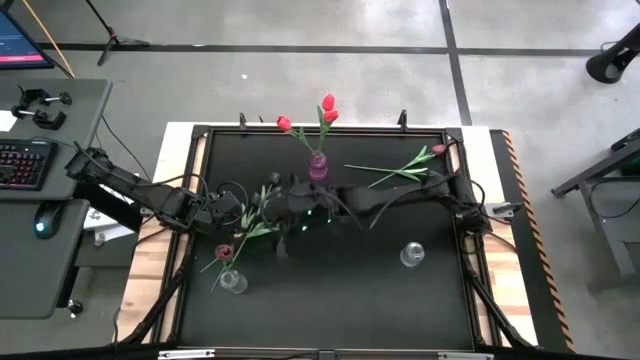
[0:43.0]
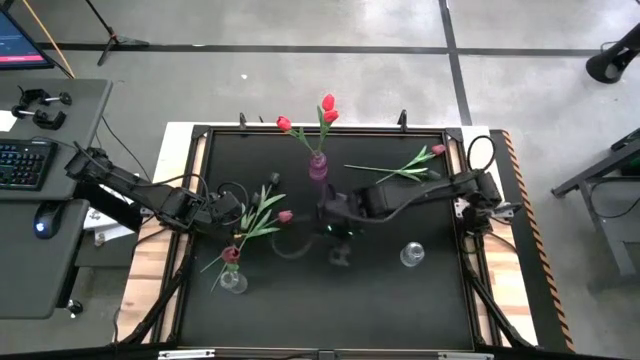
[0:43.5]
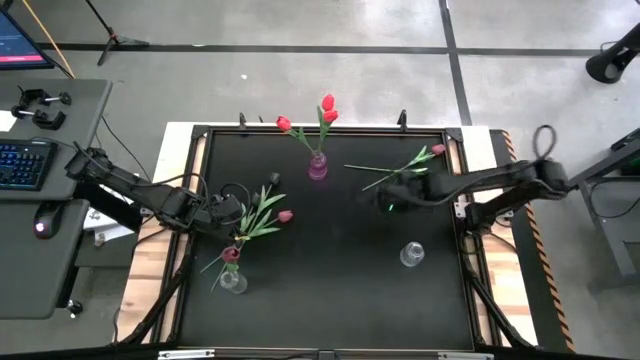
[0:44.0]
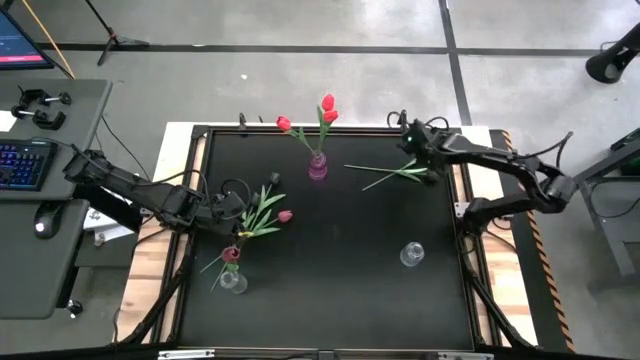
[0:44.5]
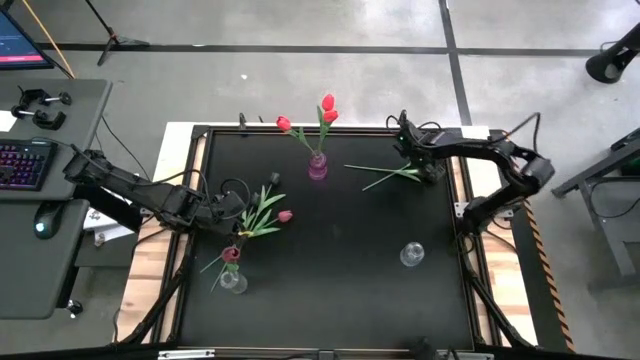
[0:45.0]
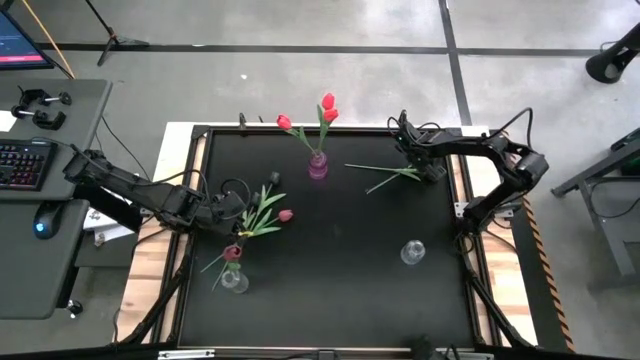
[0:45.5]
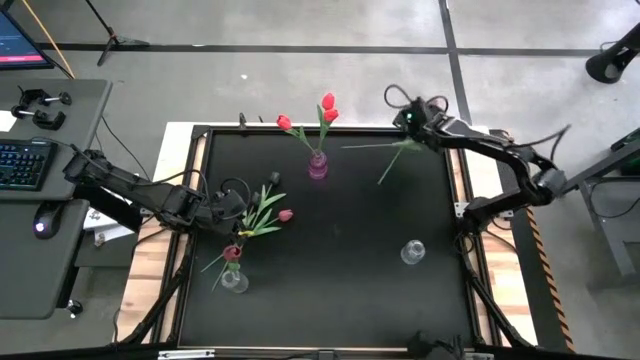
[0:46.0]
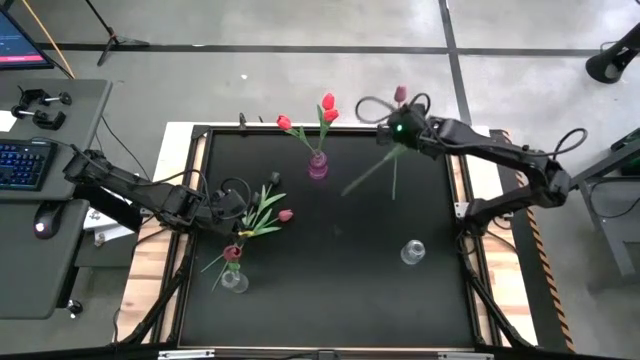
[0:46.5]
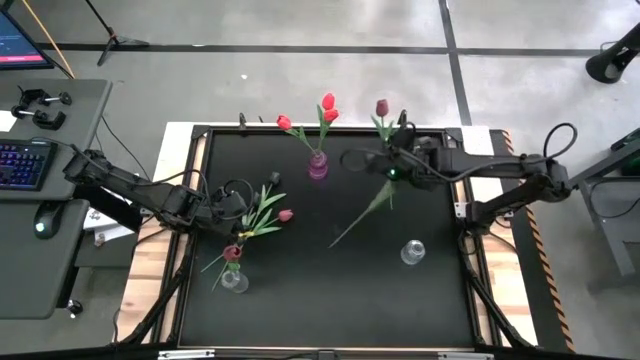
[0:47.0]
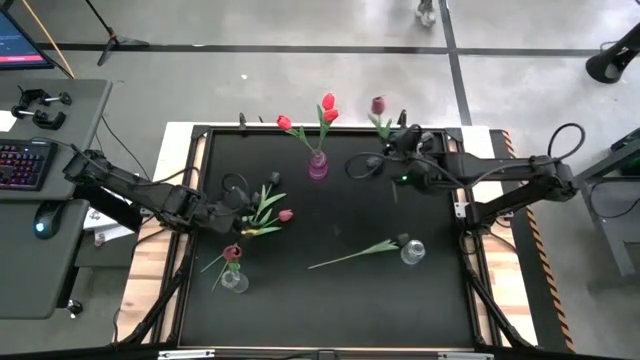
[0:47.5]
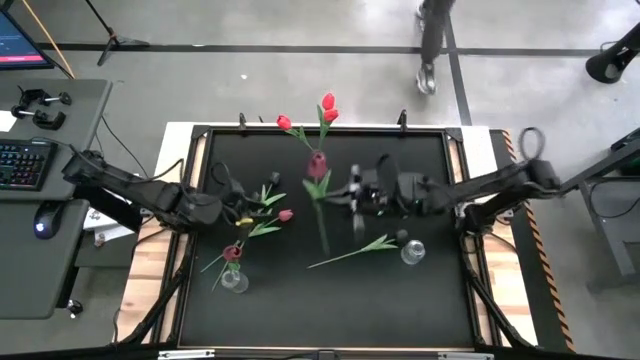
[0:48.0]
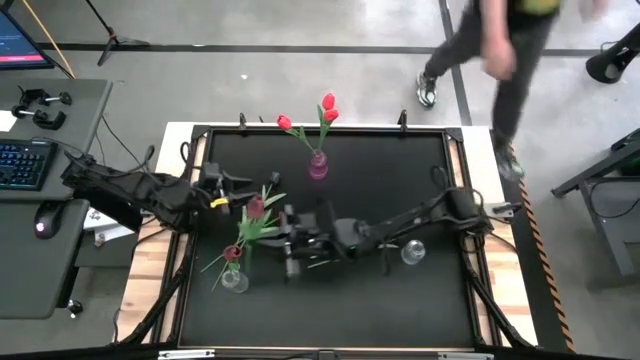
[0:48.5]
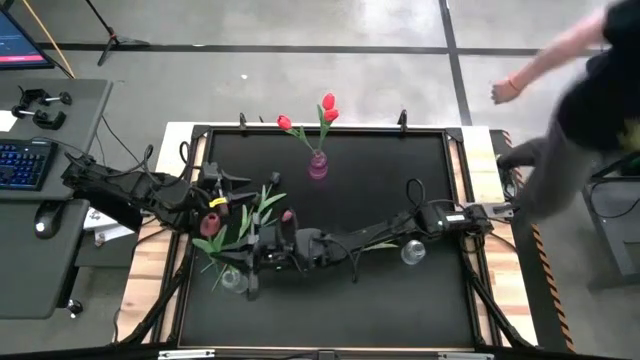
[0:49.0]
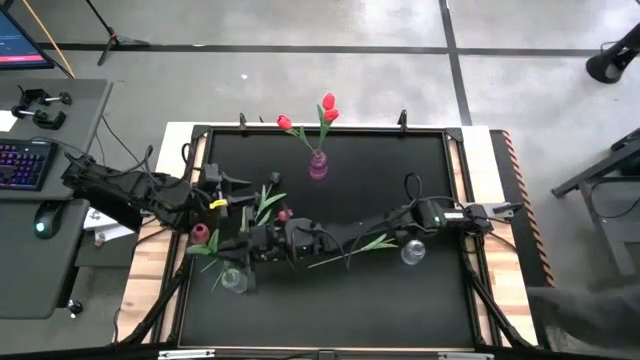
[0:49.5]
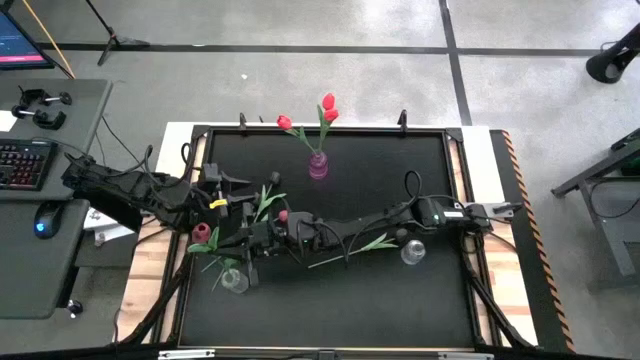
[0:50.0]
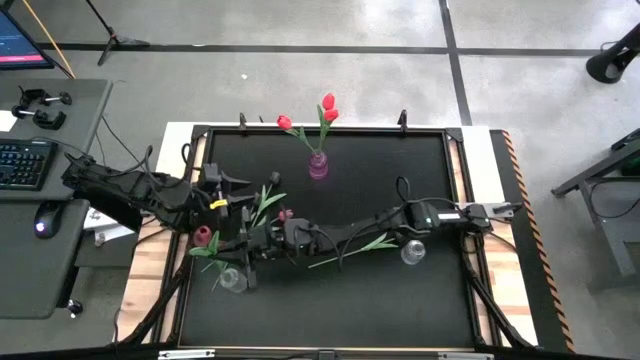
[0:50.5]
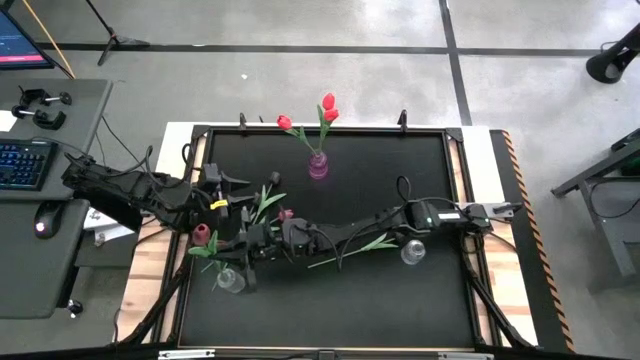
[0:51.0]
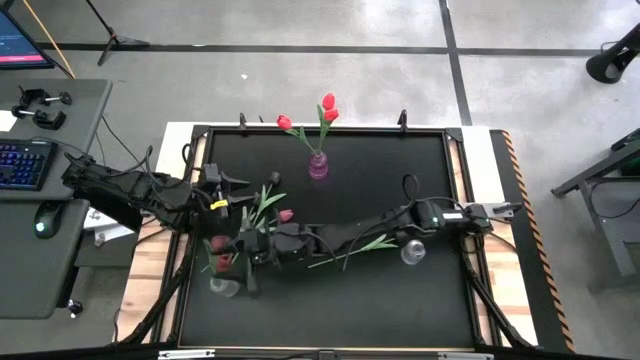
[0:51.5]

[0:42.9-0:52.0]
Task: Sort flowers into vase by color
Put the right red tulip into the left transparent vase

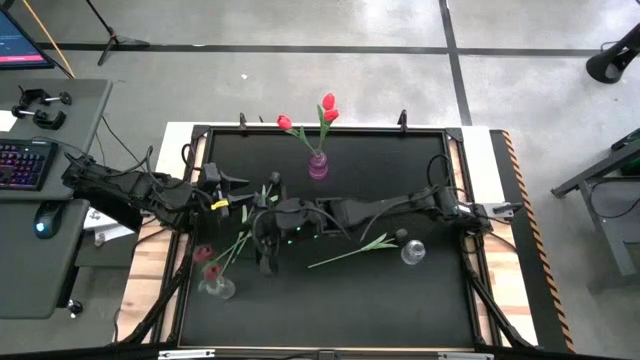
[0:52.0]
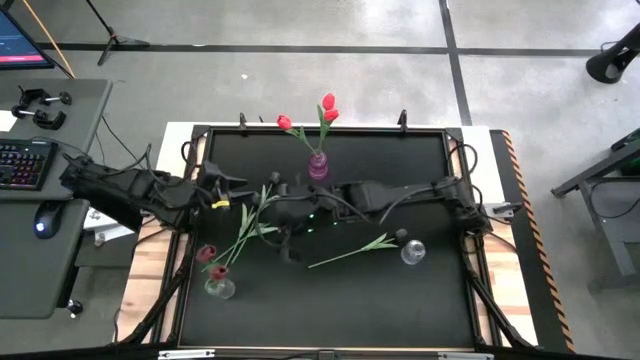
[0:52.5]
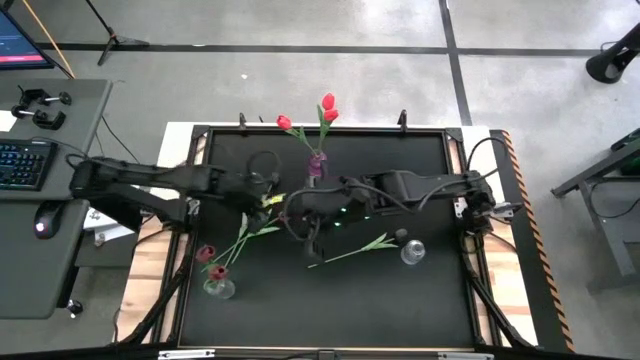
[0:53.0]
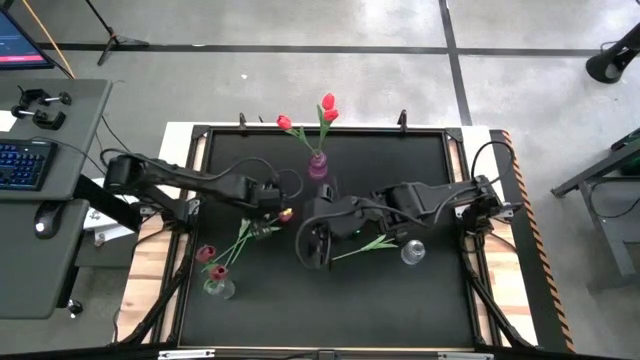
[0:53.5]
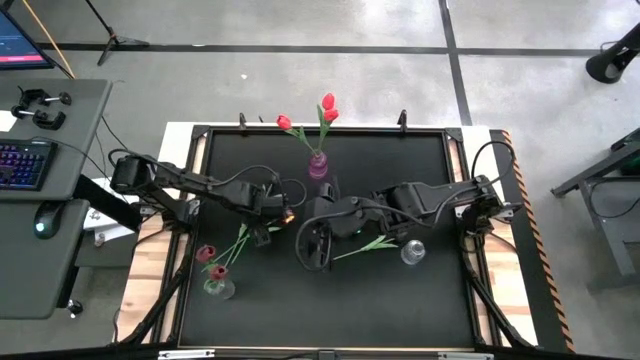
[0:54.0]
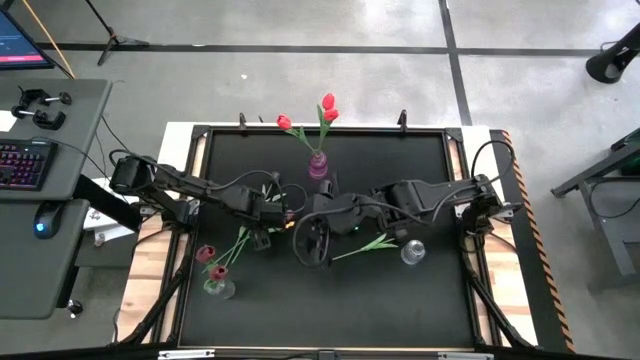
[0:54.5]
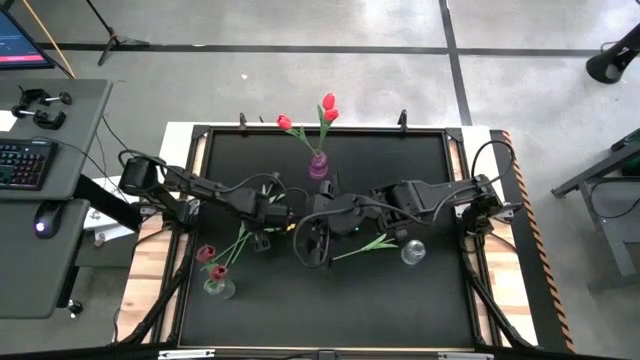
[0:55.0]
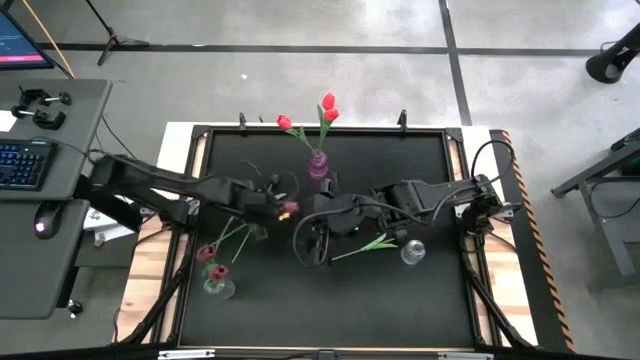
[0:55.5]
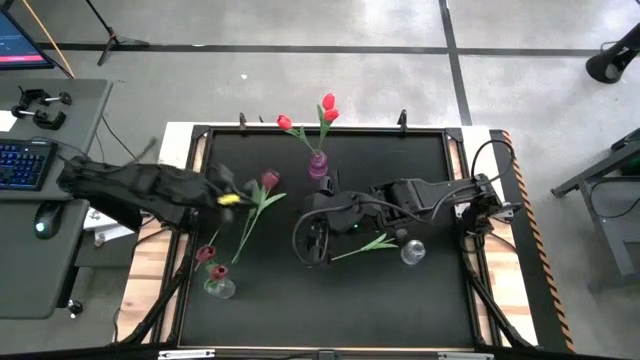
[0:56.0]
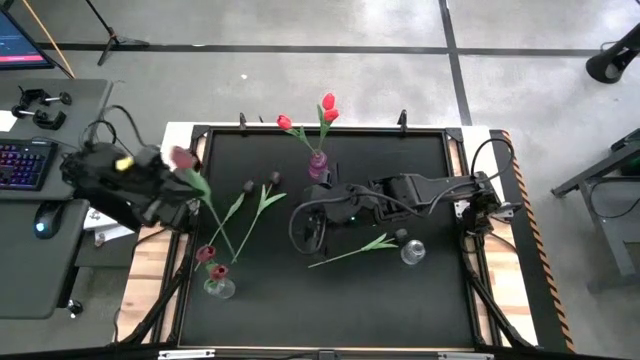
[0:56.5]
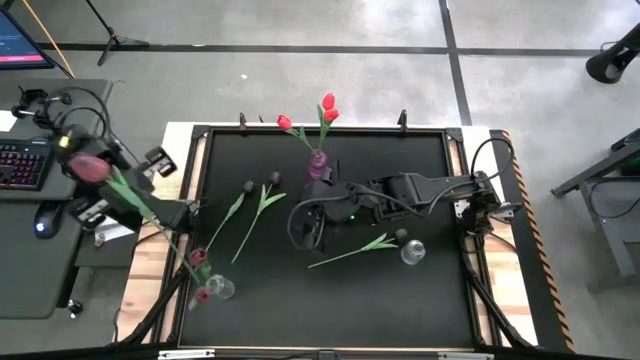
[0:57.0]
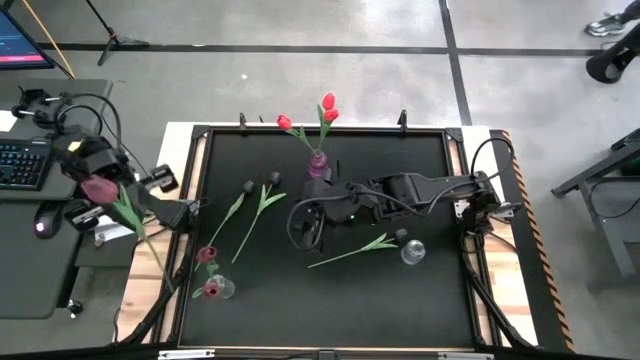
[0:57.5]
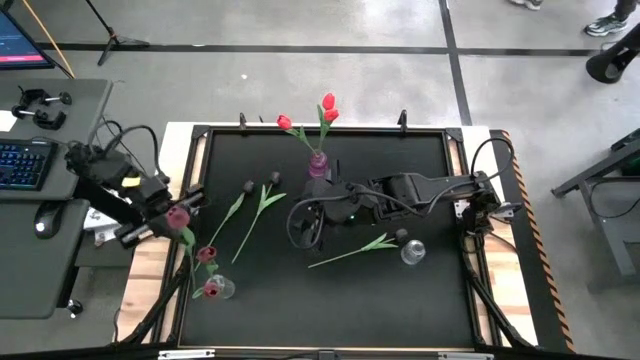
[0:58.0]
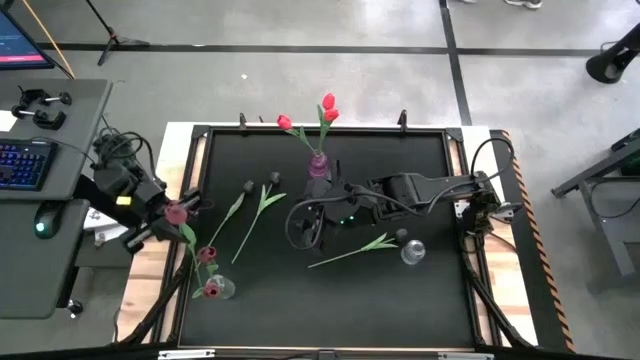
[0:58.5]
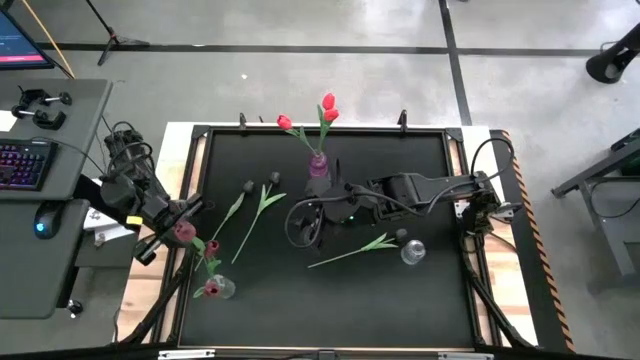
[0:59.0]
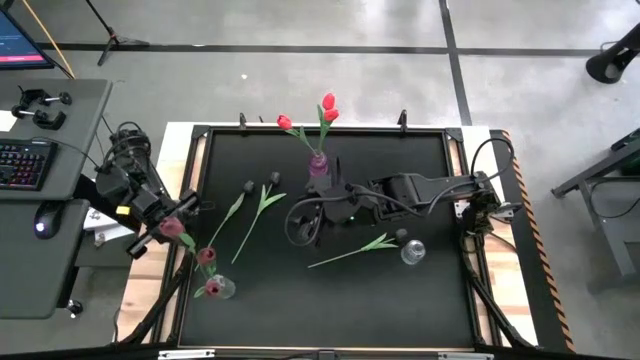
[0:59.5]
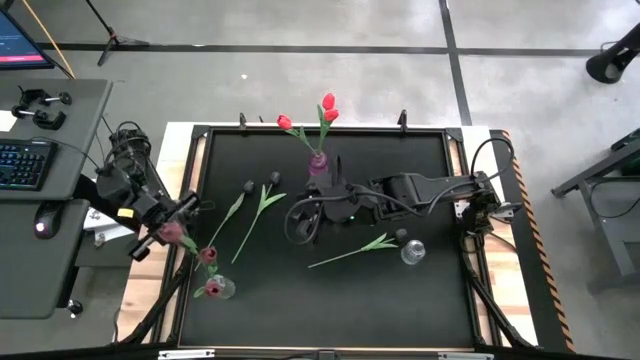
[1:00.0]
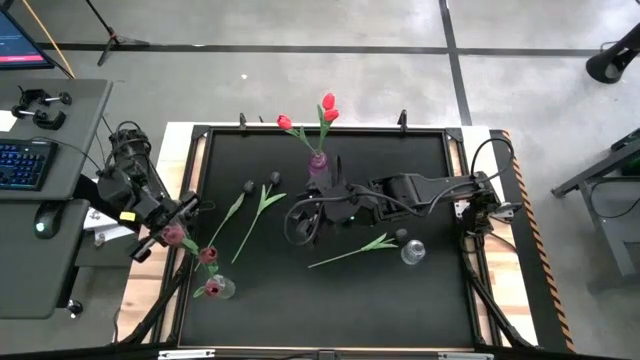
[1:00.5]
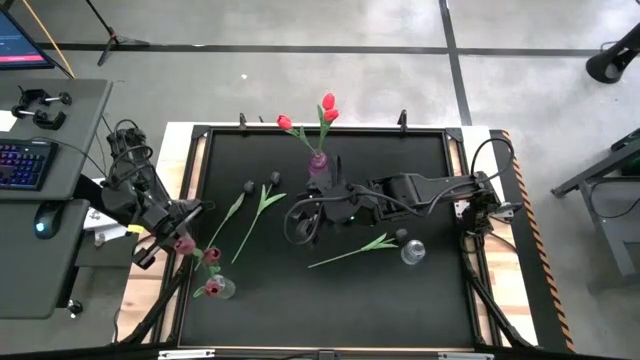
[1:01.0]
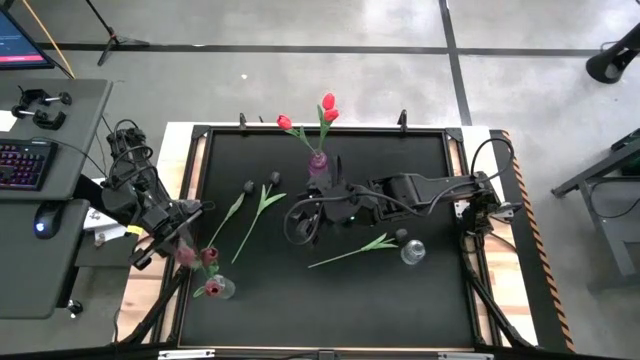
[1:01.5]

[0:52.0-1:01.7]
Put the red tulip into the left transparent vase

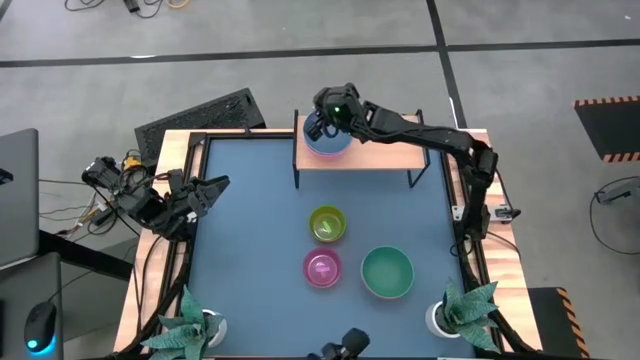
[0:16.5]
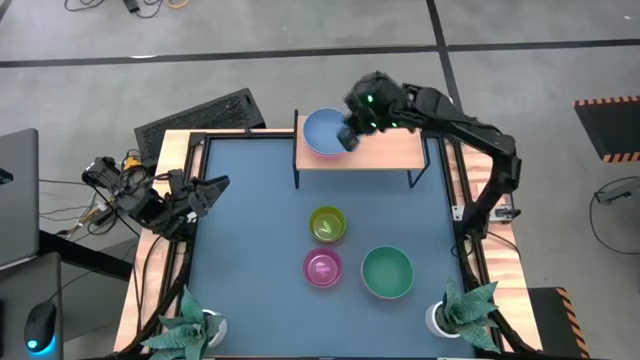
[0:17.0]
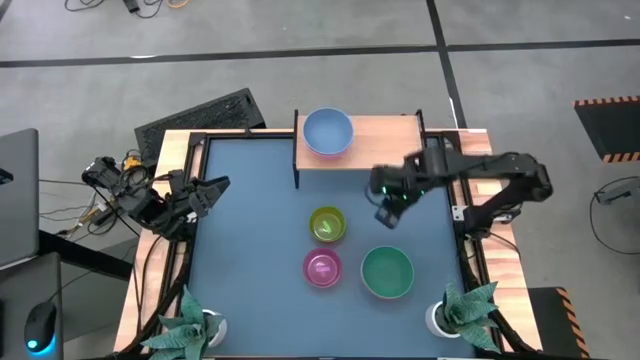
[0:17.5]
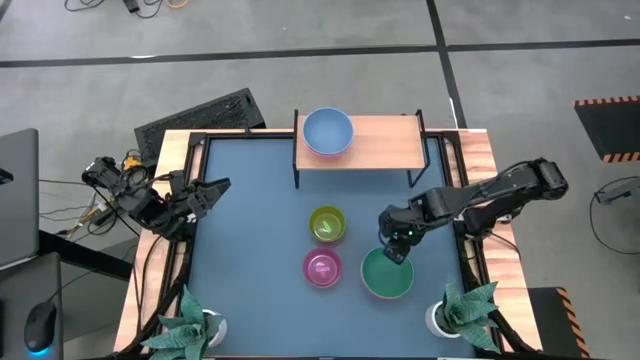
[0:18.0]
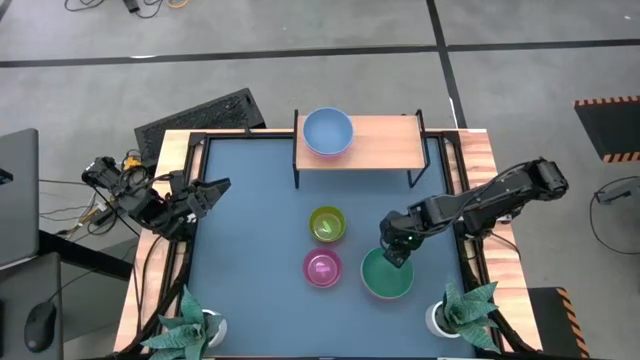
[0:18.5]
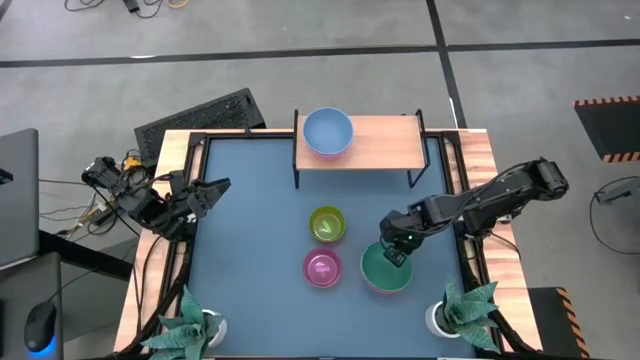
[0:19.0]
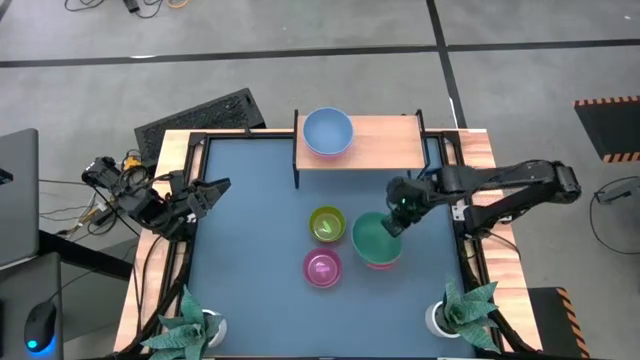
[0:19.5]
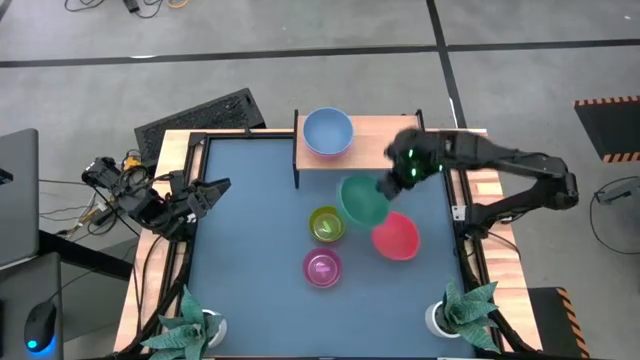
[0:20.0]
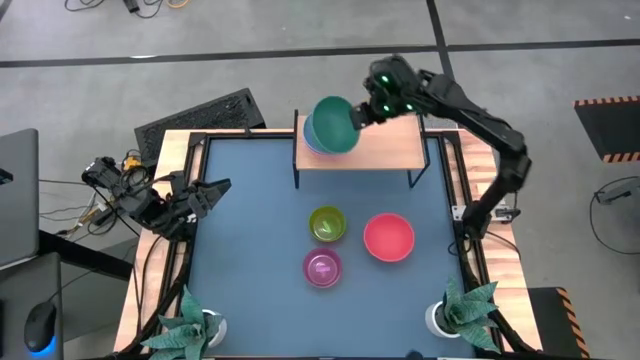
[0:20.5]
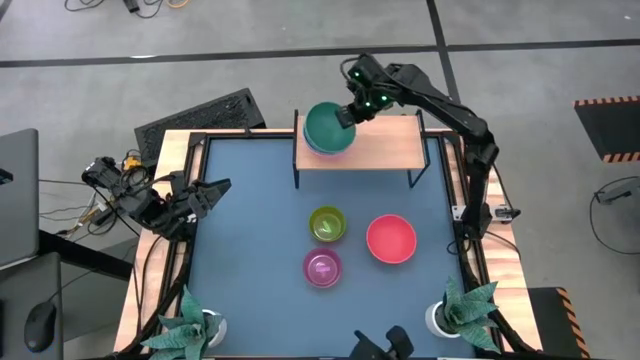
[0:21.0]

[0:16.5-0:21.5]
Task: Place and stack bowls onto a shelf
Stack the large green bowl on the large blue bowl on the shelf
